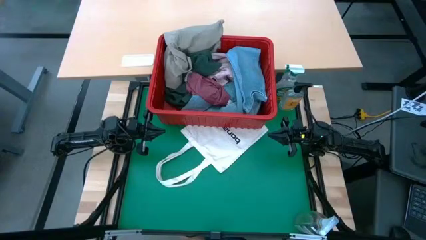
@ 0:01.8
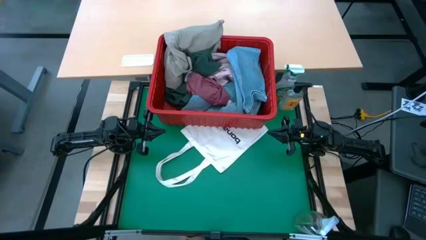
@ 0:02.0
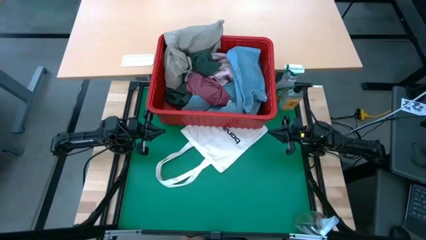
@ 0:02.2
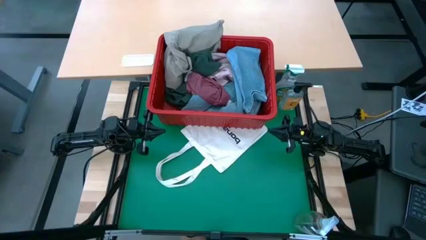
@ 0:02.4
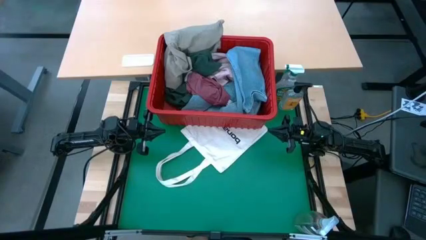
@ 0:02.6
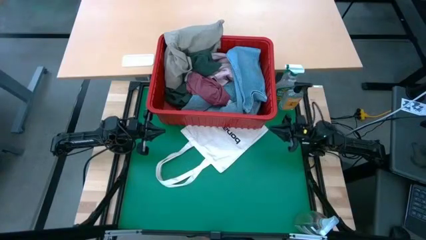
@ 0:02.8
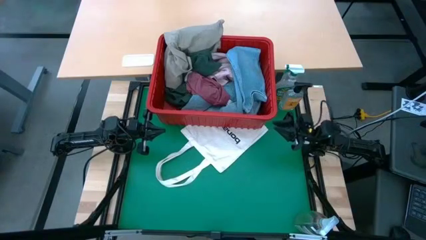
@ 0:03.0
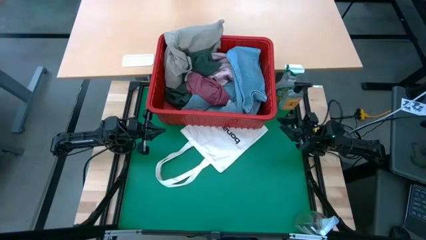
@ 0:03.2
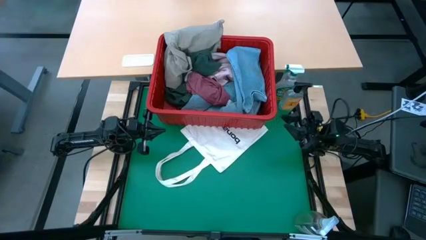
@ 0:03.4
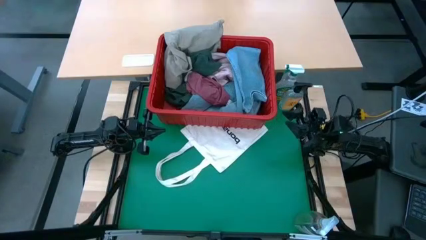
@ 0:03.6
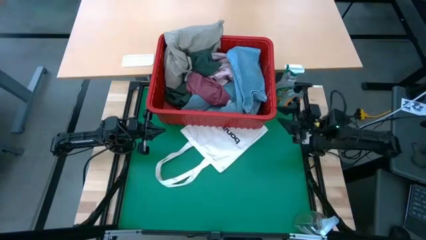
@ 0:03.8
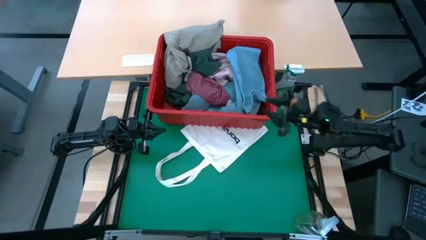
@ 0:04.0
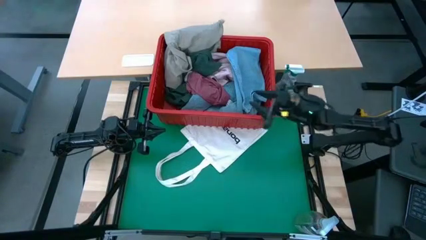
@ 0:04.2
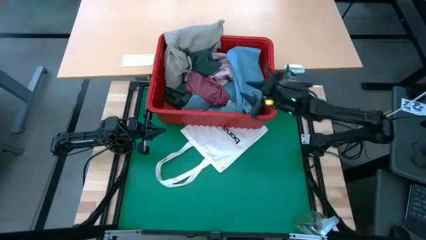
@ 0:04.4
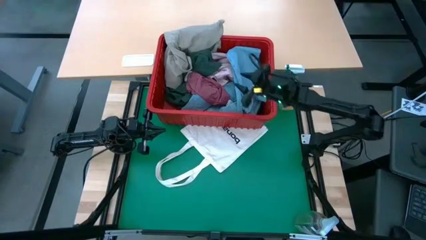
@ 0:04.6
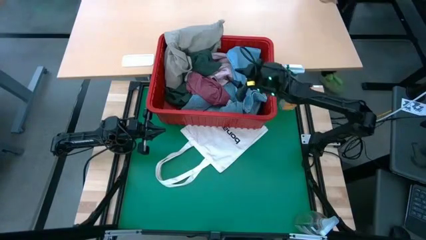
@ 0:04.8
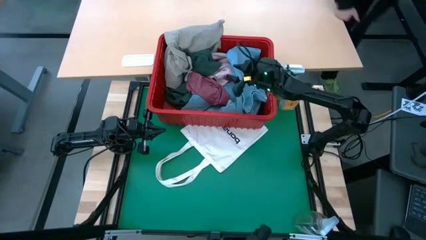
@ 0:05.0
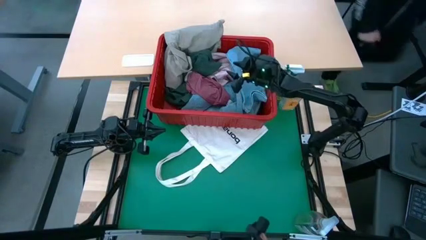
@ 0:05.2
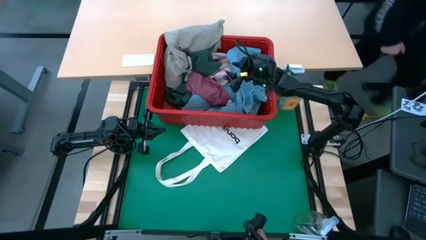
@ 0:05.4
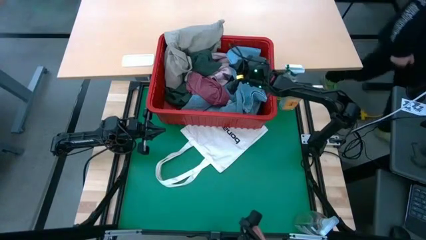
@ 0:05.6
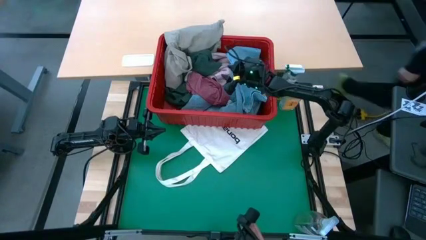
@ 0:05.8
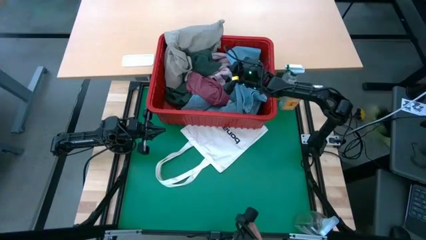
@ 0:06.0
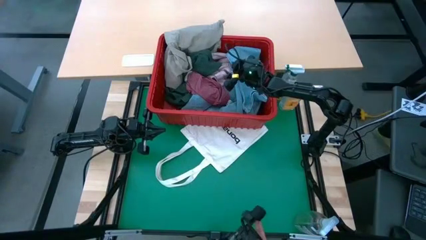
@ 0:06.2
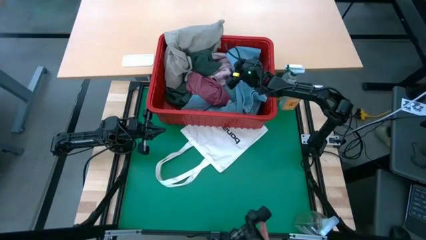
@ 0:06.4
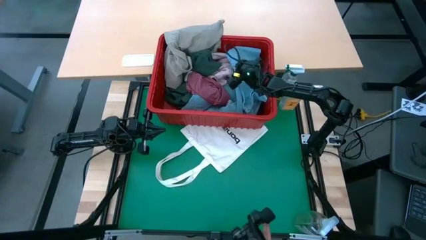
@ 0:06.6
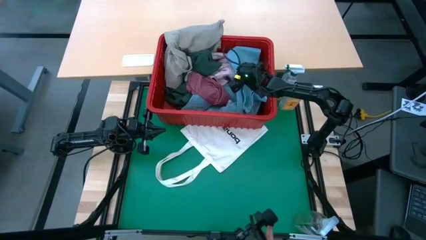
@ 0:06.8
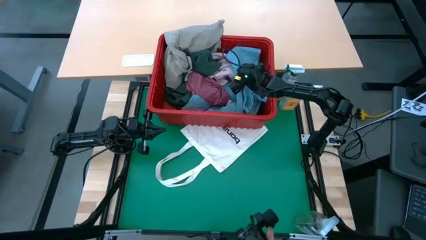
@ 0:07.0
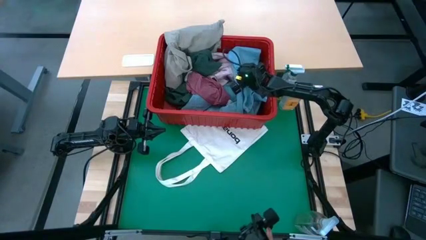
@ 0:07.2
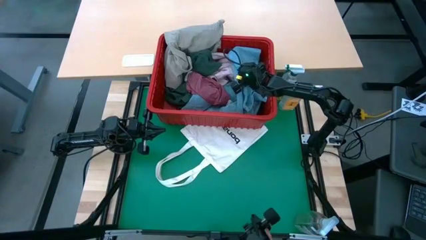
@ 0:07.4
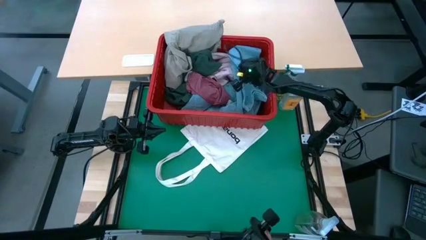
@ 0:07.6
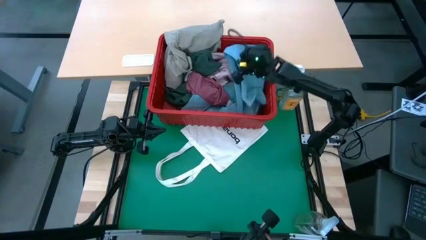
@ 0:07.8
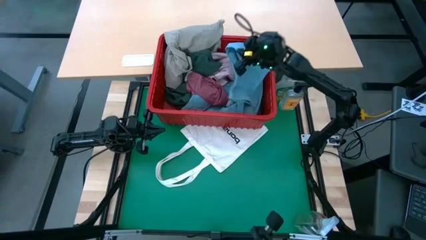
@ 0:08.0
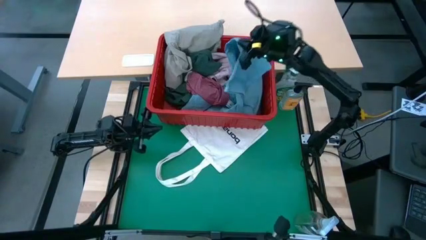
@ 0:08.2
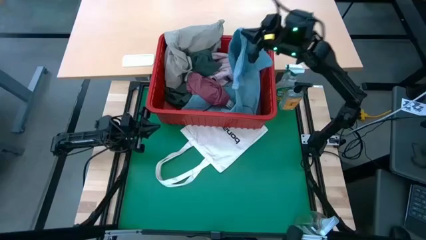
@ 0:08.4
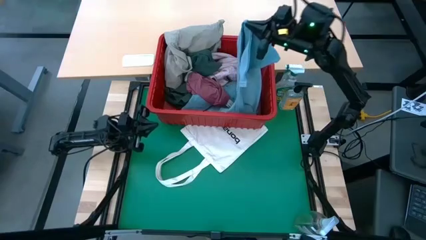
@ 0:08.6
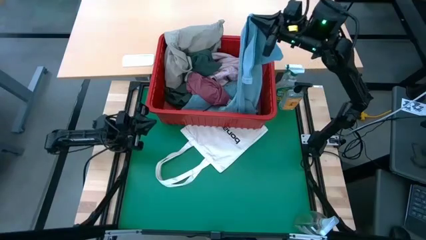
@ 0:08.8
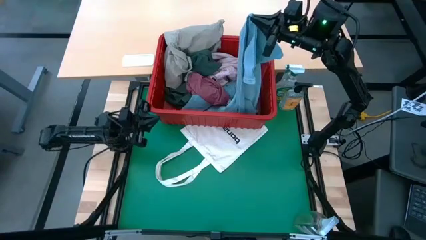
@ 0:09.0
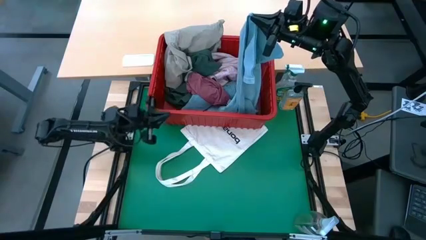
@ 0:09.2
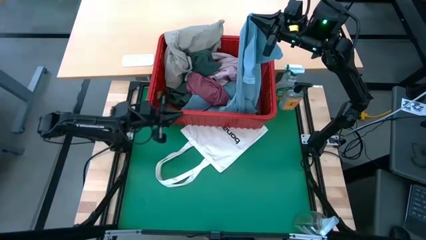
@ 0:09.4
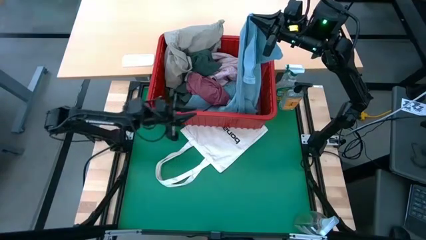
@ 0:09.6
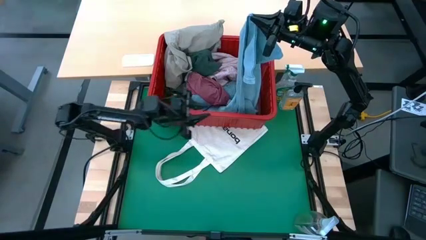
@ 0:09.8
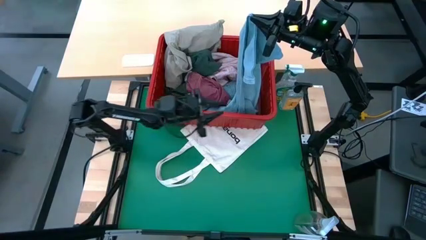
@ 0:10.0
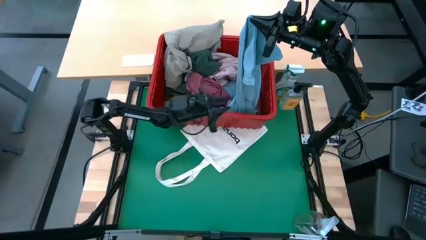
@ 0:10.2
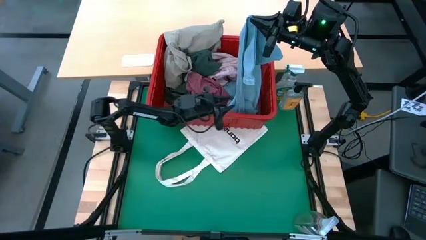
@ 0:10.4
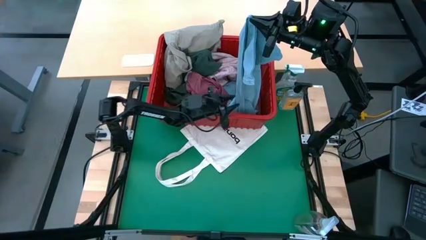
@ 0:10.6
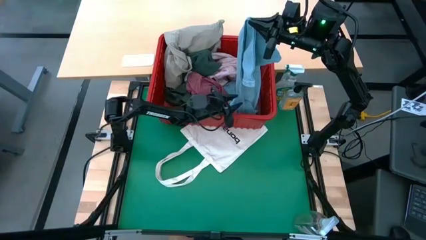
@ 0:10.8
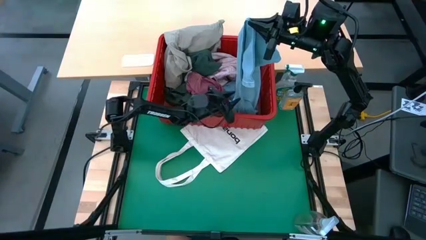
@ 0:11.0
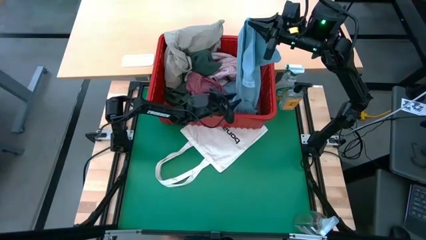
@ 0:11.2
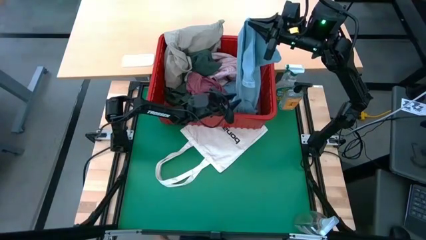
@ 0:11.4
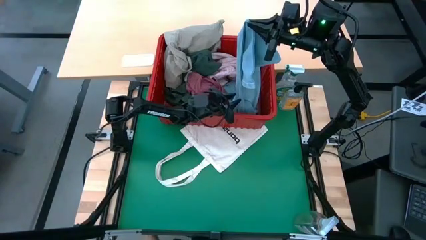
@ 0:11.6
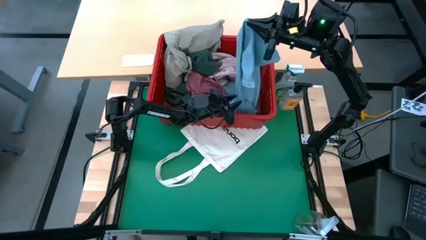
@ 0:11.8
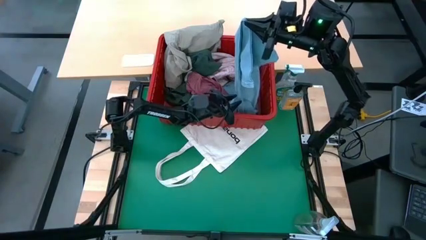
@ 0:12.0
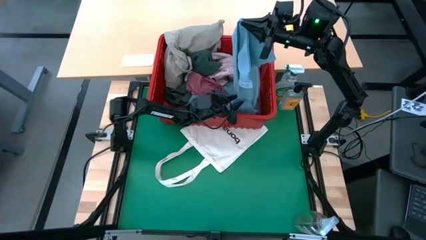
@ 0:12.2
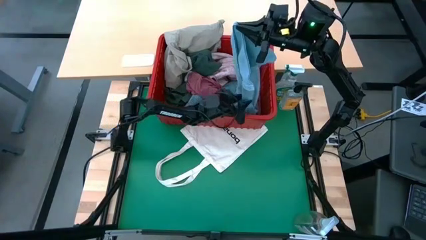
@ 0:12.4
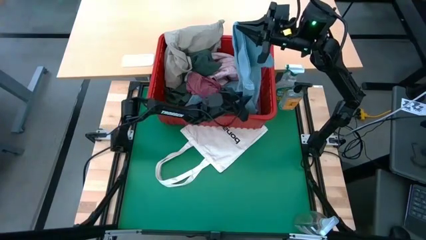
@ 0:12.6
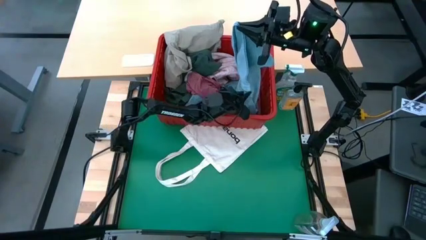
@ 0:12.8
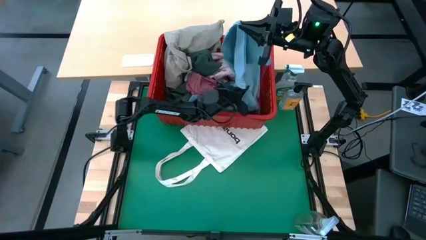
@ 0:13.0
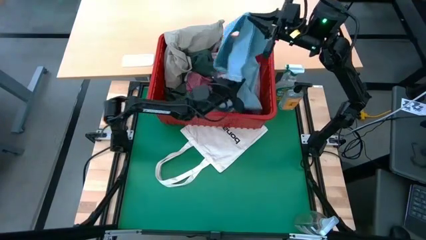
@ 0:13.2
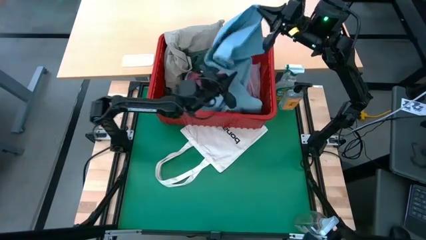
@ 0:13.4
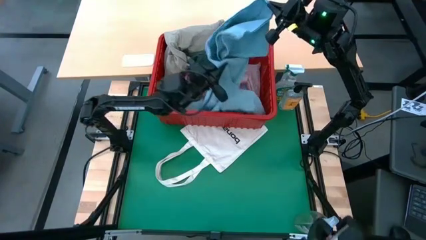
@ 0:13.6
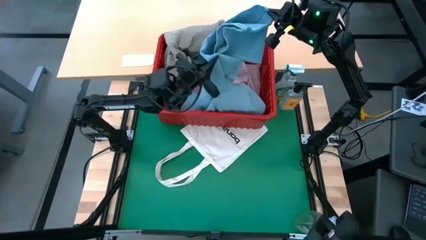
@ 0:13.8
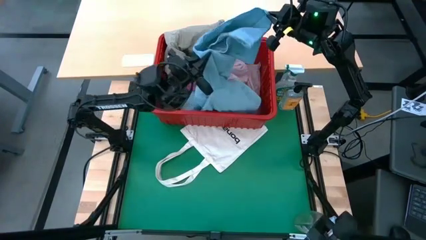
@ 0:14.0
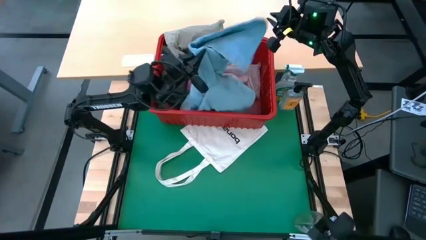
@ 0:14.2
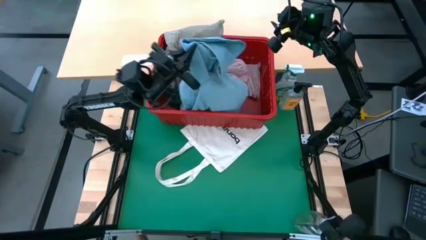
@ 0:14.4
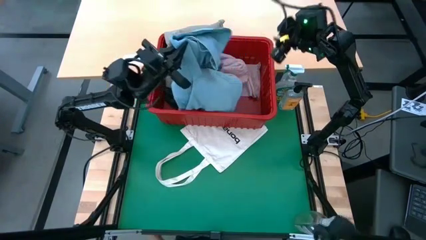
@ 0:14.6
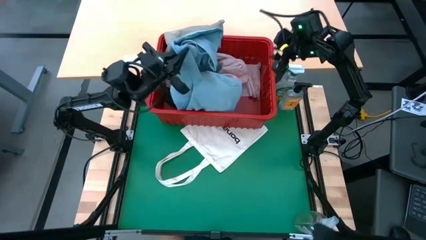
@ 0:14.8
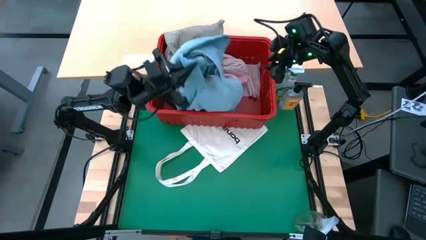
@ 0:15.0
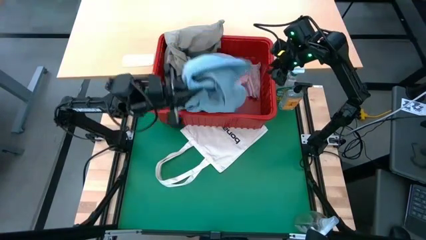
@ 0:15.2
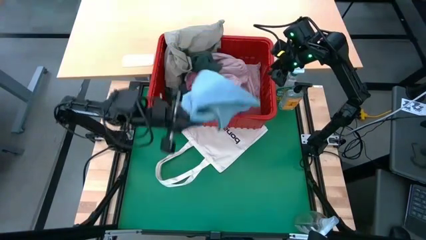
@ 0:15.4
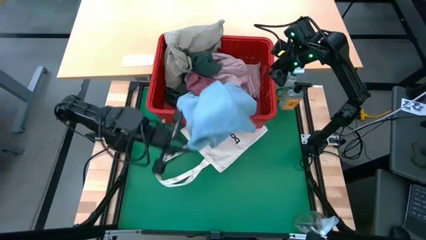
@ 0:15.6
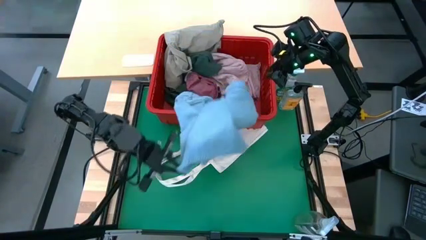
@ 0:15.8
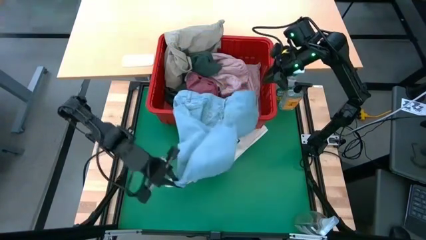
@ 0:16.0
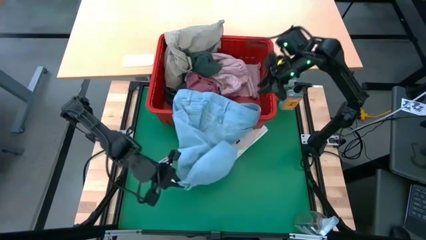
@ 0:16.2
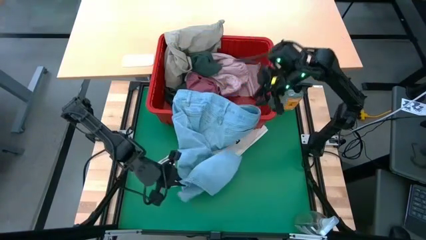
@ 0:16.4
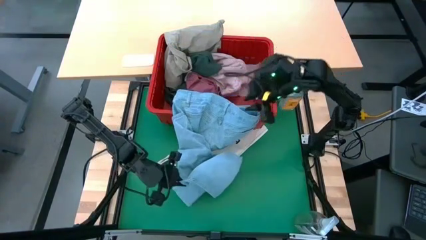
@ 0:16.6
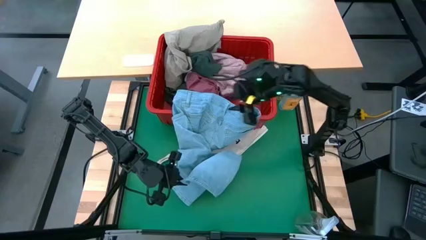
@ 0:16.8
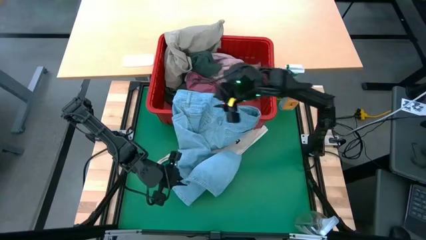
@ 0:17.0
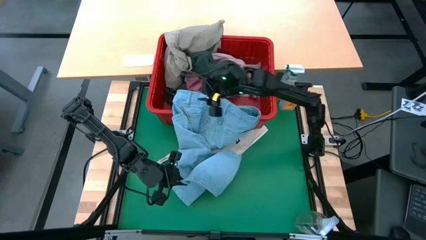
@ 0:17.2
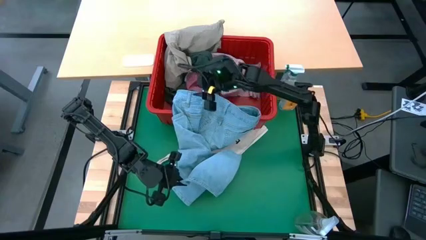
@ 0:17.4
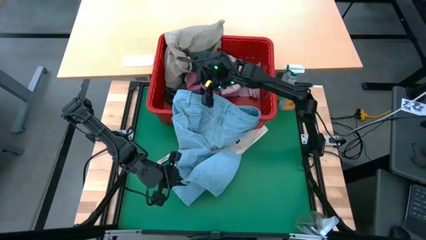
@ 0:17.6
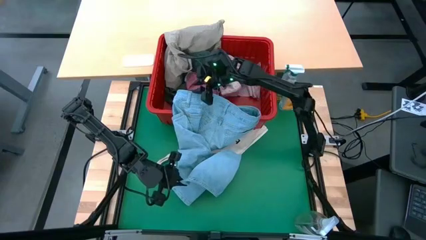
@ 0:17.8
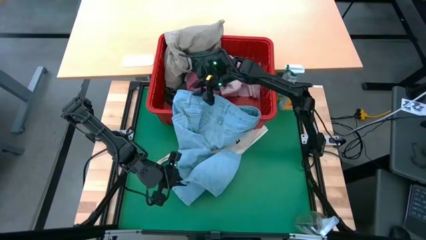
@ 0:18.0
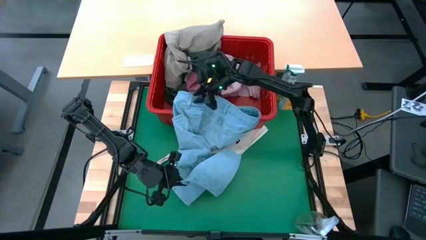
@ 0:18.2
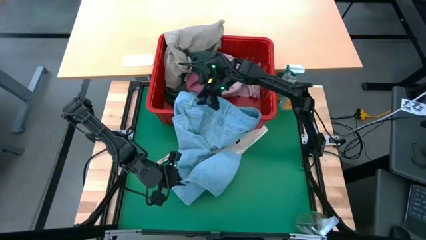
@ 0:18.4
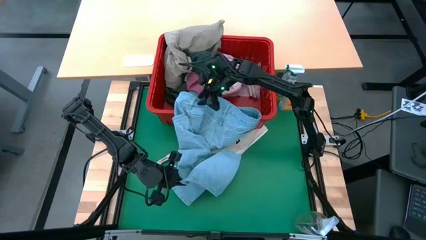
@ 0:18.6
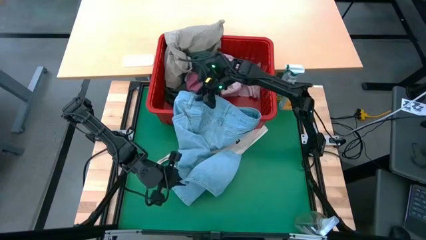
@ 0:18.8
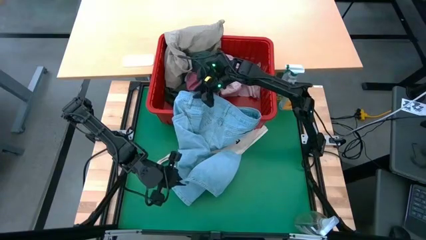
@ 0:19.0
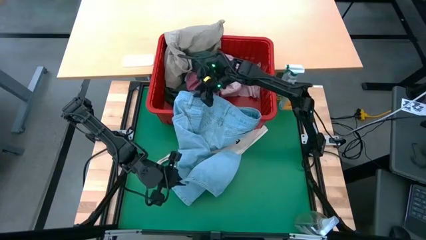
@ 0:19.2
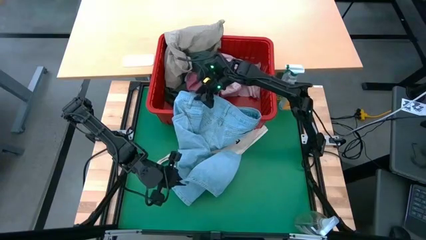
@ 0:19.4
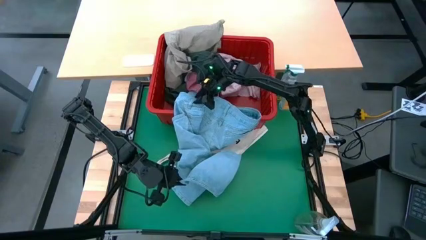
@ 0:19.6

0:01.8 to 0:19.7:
Task: Fold laundry
Fold the blue jeans
